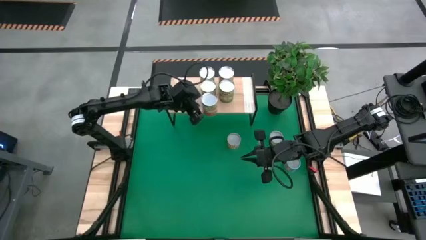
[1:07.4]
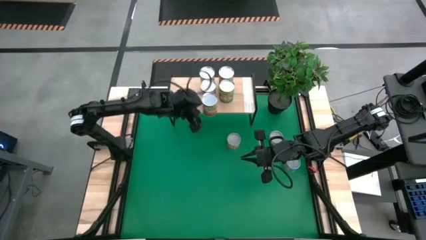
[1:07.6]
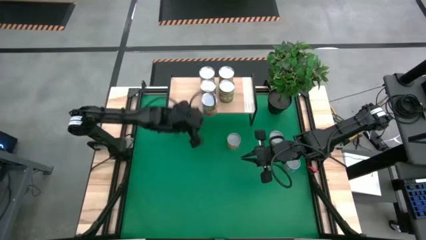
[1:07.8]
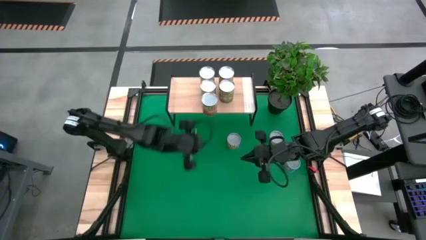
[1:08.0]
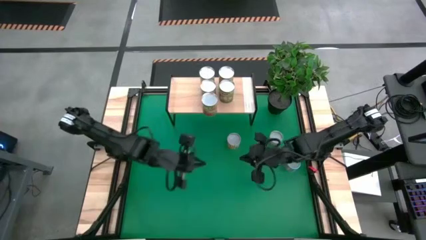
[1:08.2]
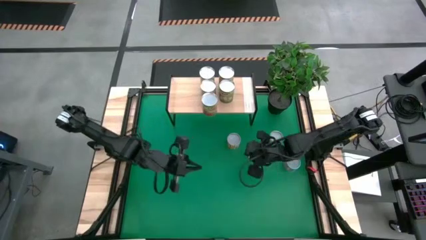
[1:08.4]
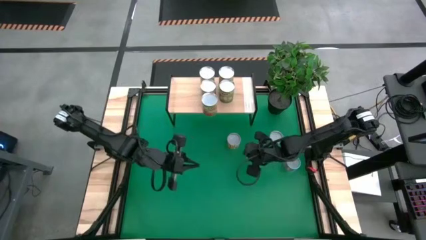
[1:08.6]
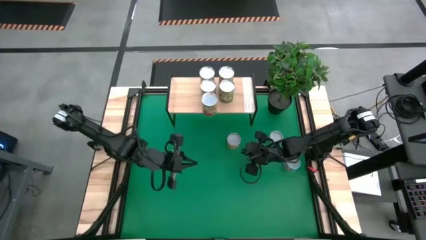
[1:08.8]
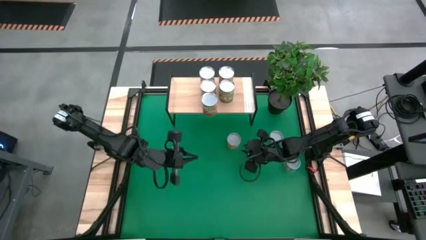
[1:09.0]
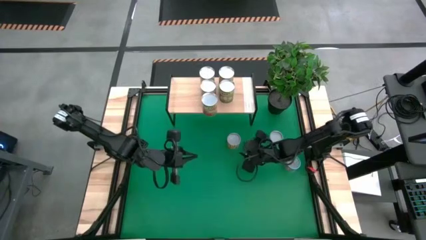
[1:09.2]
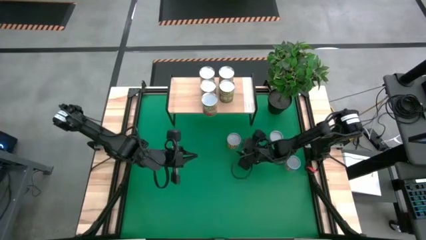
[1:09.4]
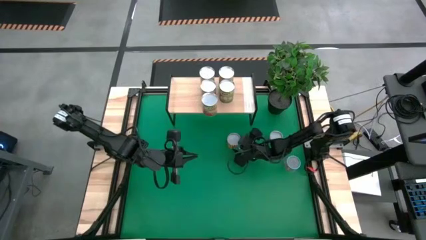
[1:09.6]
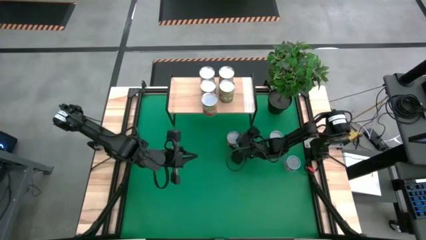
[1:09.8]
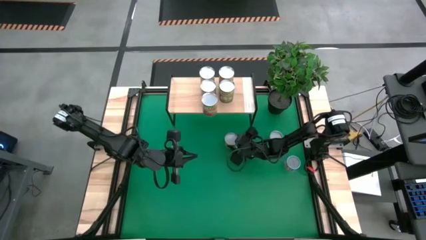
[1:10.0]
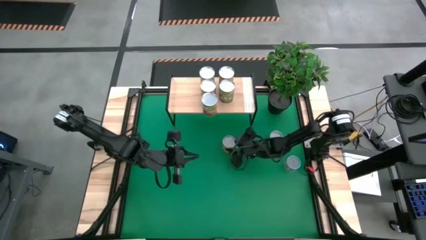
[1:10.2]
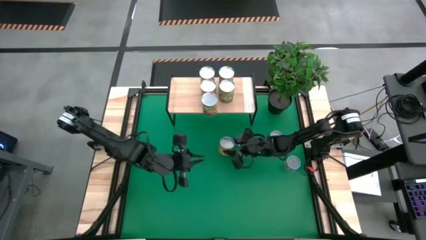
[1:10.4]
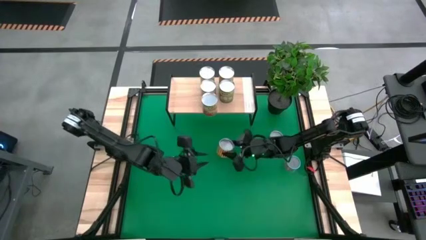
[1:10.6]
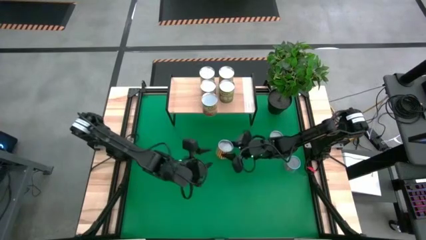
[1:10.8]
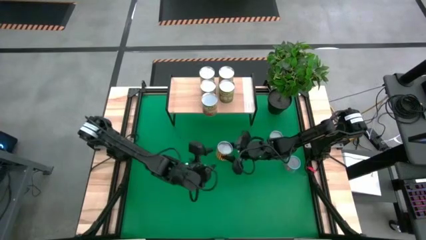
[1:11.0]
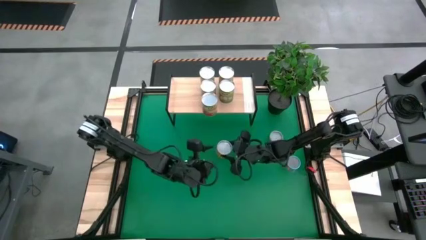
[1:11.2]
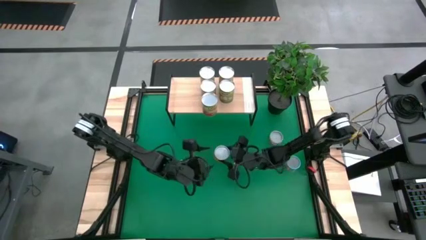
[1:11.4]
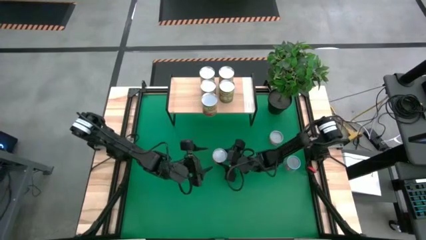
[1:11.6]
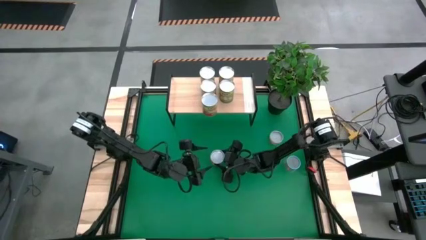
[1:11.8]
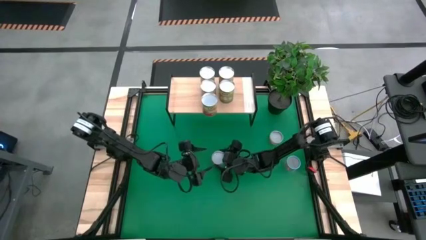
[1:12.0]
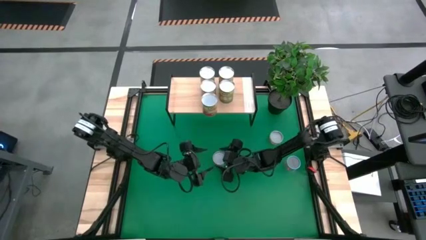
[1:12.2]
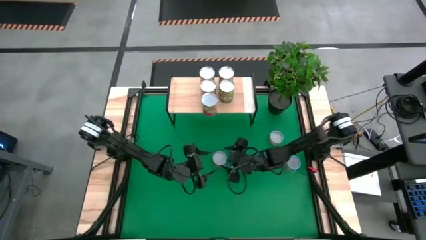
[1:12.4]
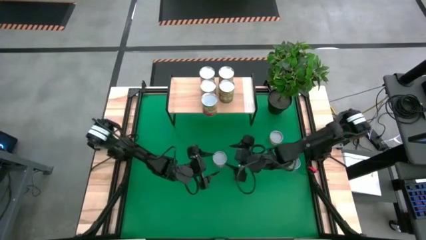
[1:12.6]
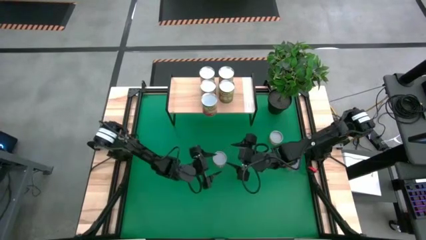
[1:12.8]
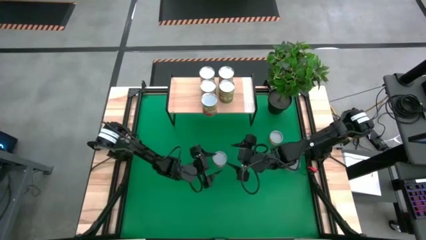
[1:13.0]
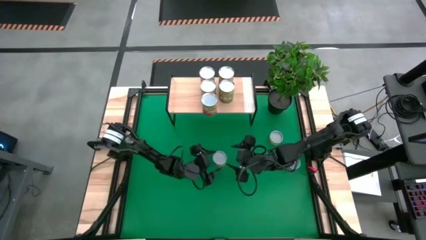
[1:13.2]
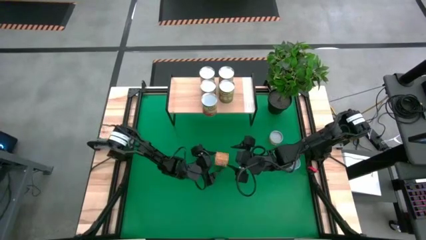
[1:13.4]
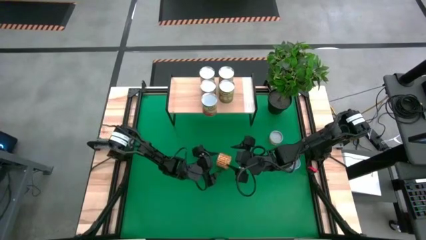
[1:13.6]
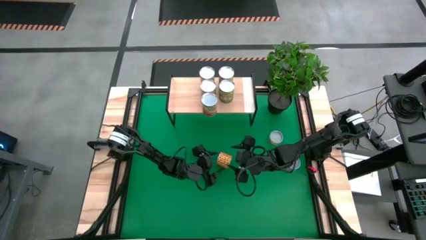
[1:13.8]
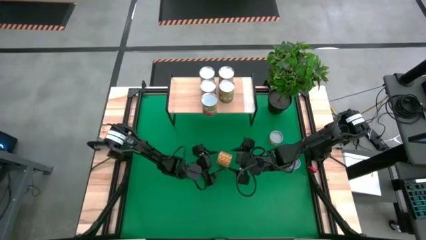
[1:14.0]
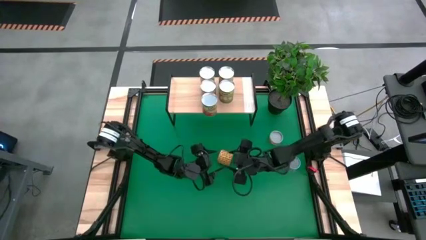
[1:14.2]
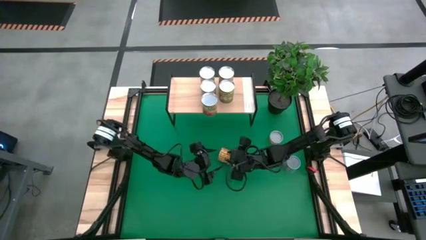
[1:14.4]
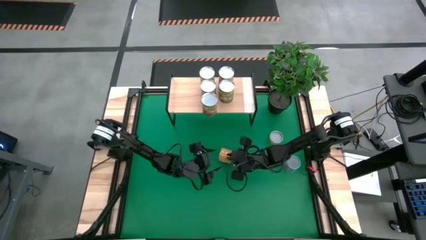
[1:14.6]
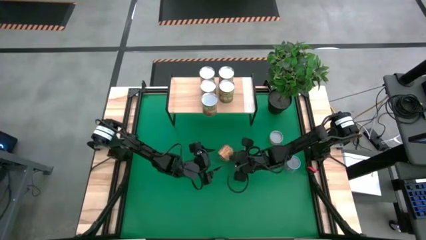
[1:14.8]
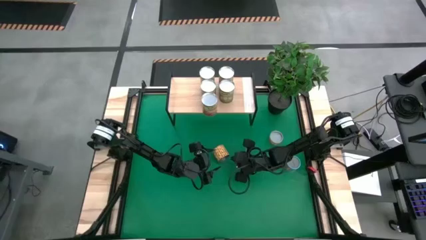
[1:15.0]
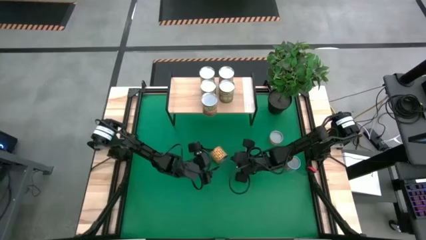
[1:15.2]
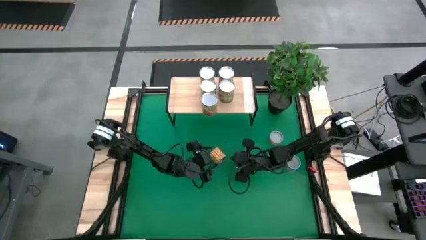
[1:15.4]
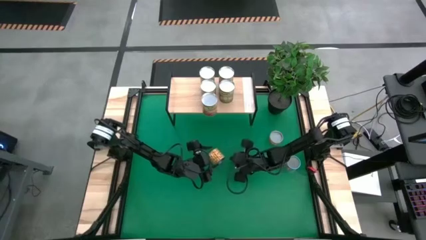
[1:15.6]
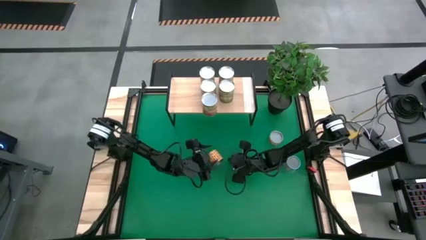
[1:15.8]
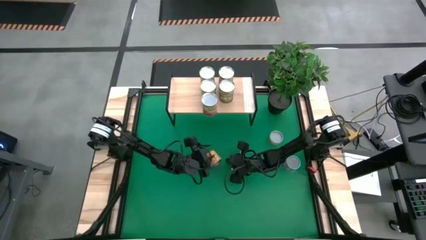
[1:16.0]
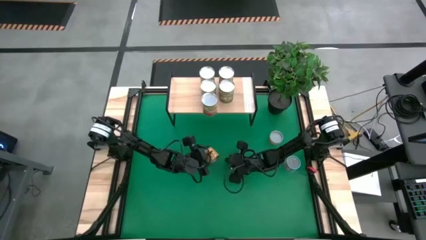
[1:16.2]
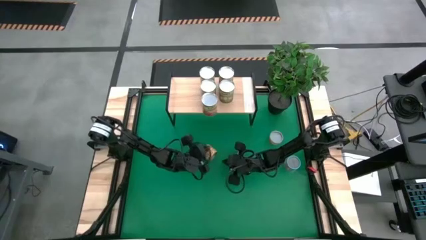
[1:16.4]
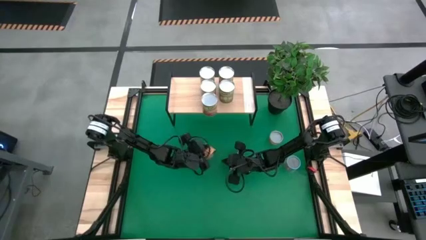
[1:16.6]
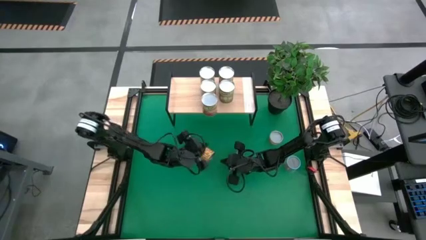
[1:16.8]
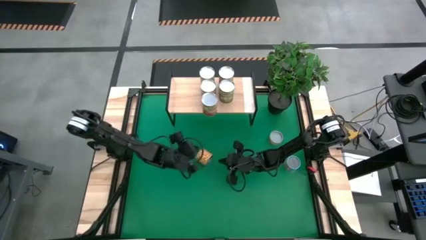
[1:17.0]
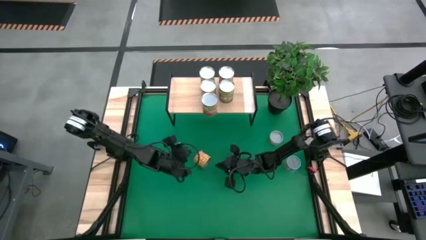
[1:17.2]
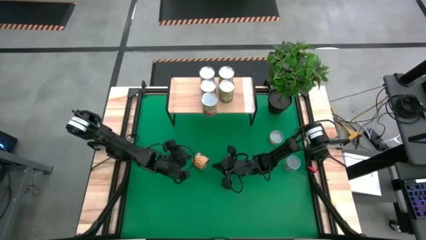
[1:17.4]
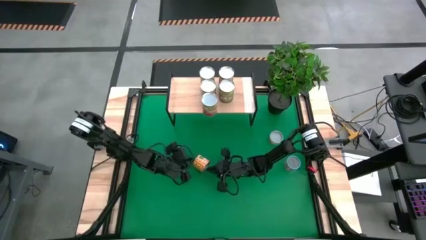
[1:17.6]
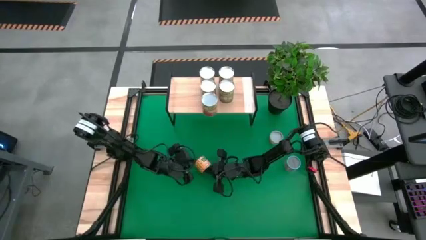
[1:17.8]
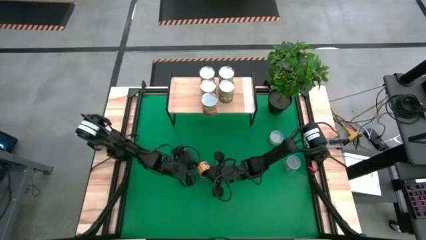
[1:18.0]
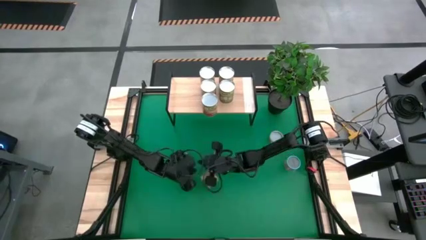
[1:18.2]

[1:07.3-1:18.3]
Task: Pick and place cans onto a shelf
Put the canned black beans on the shelf
